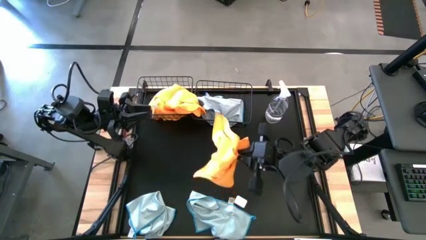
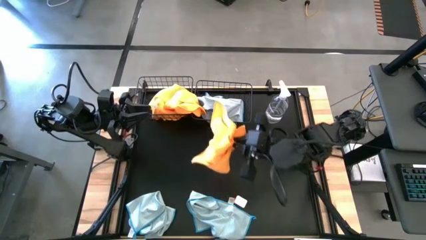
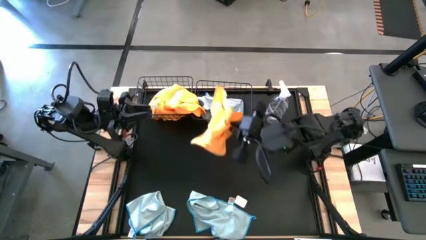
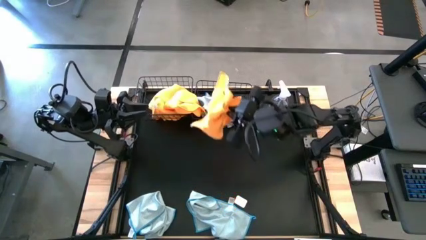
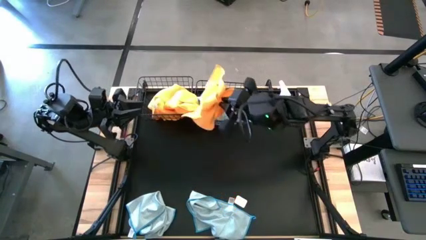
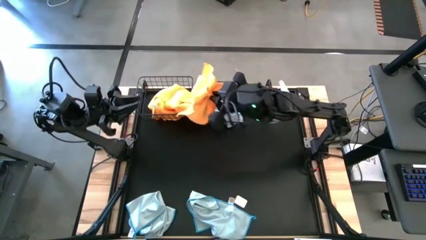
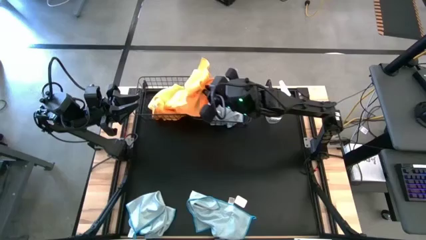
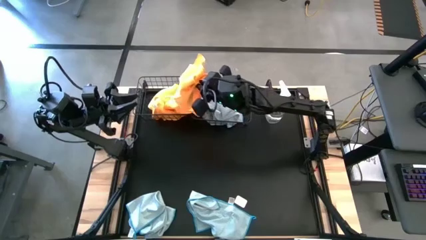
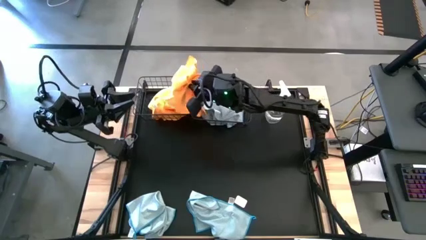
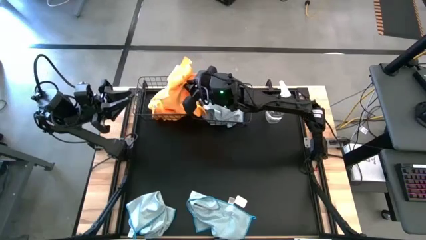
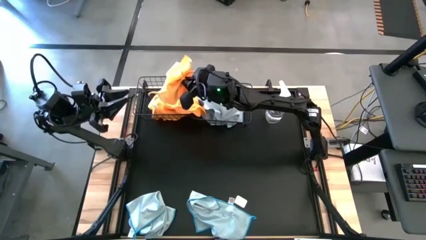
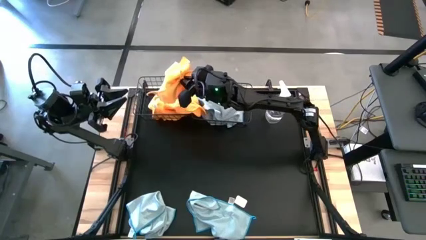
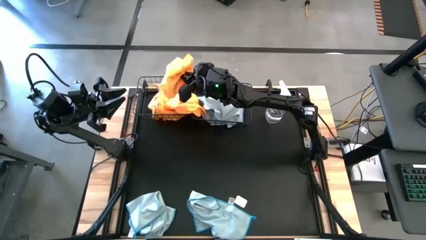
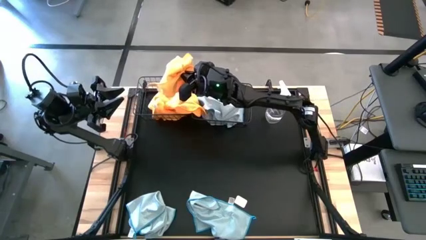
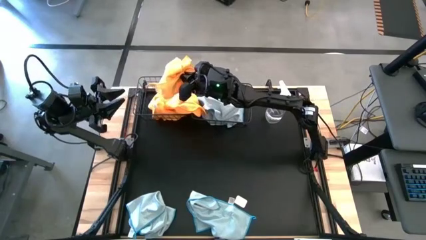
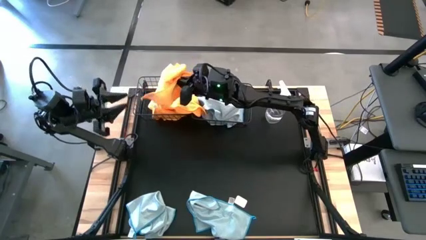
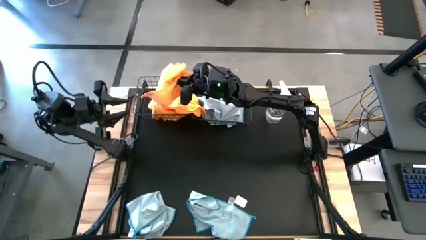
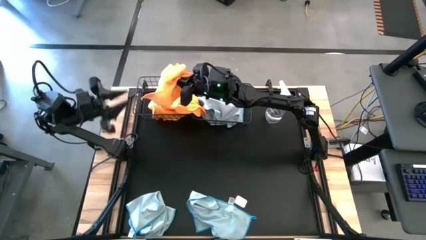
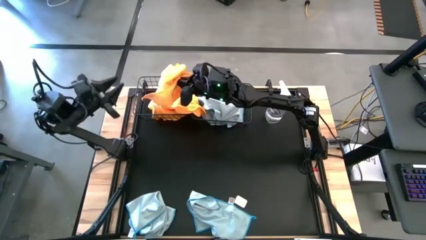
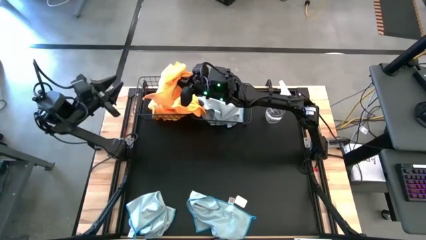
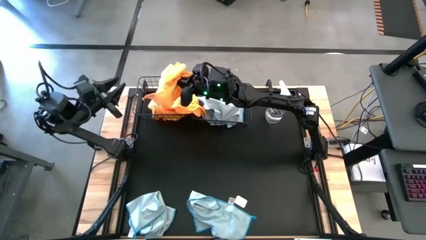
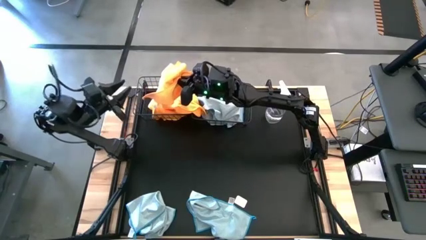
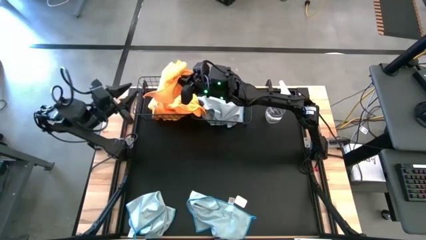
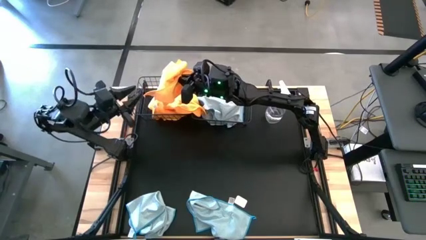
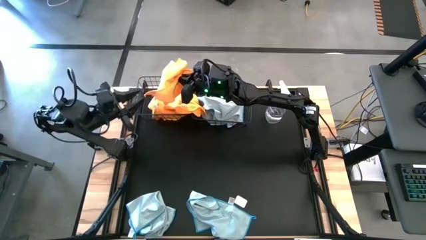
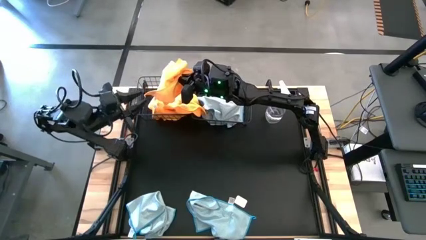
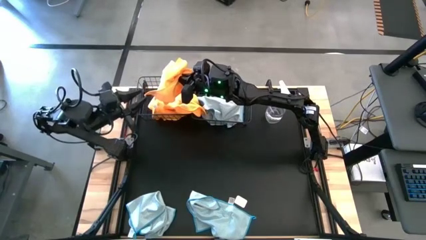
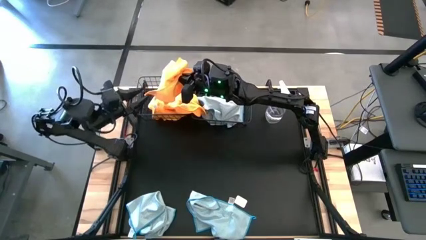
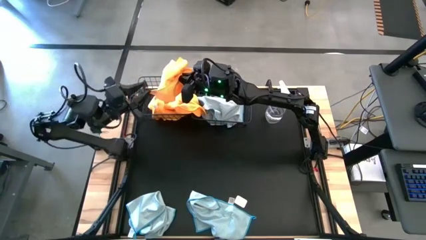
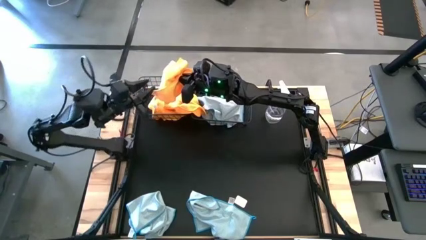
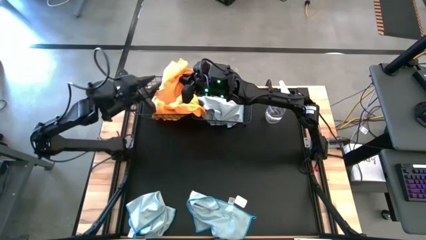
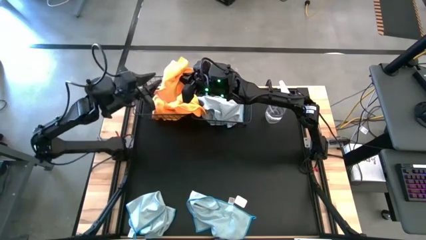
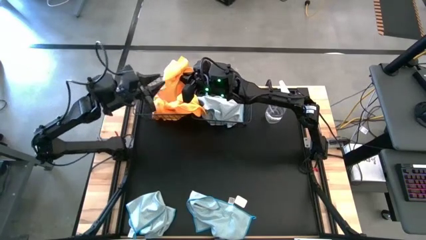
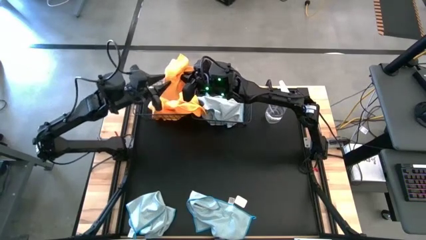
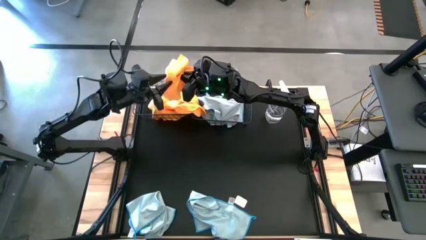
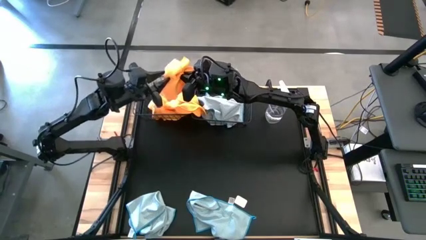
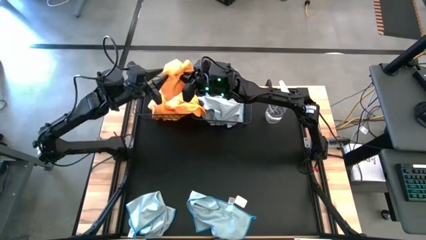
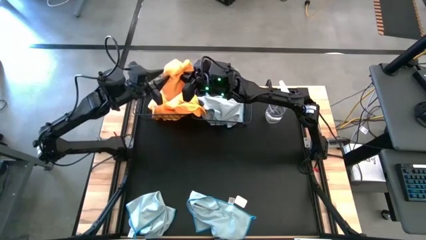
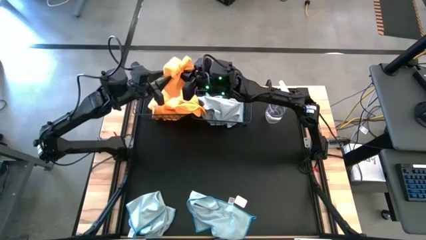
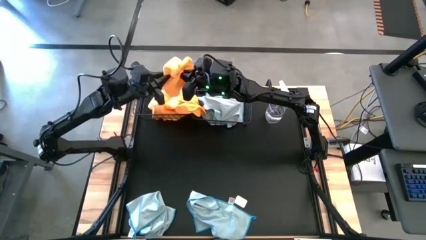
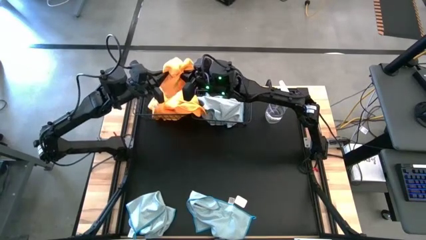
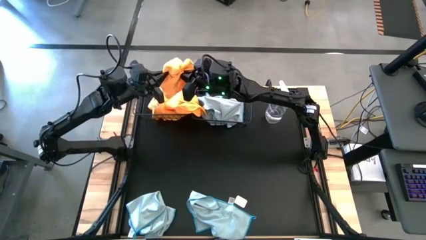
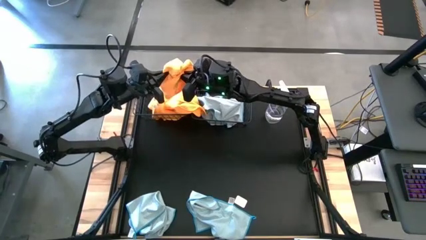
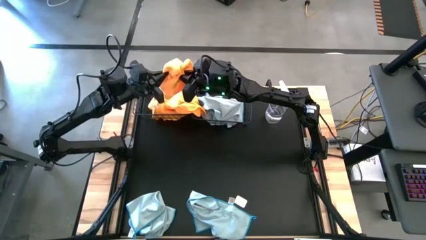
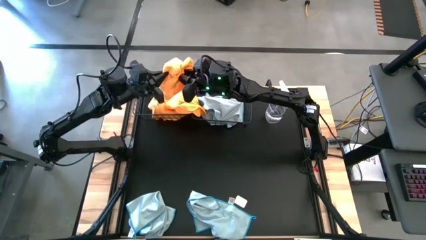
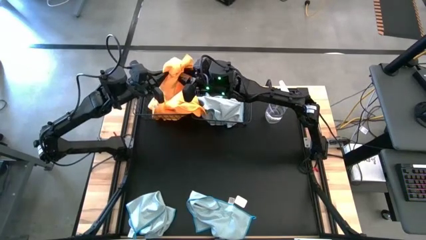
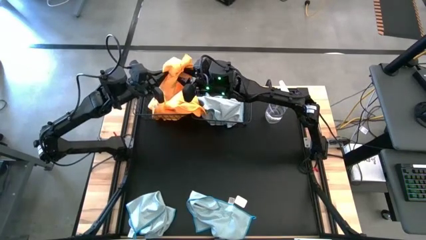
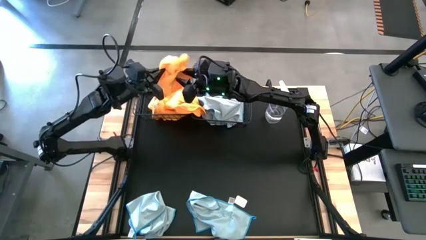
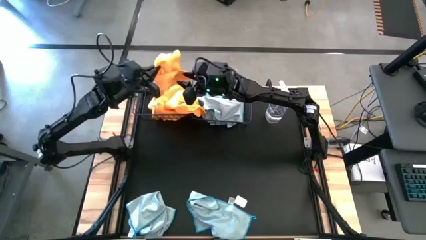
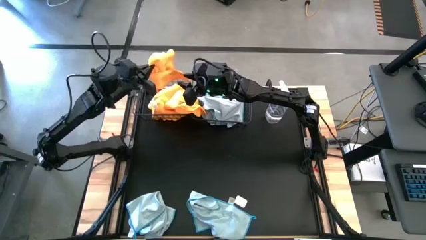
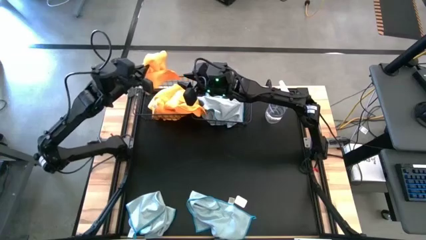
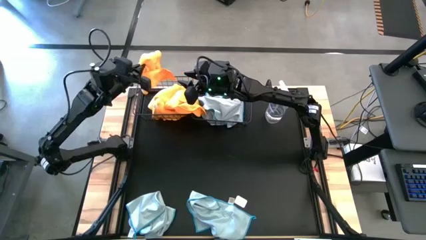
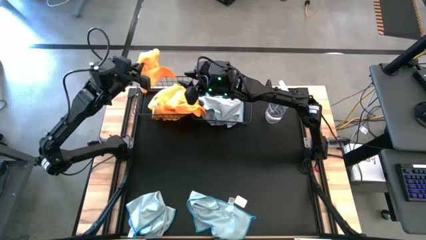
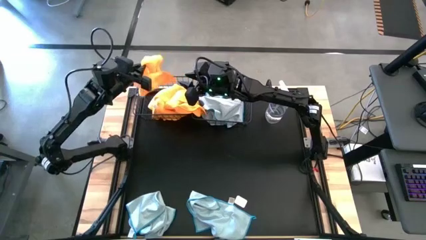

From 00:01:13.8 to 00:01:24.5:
Task: Sort microfiber towel by color & place in baskets
Put the yellow microfiber cloth into the left black wire basket

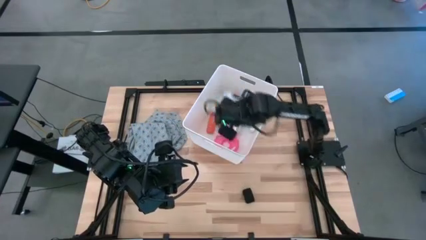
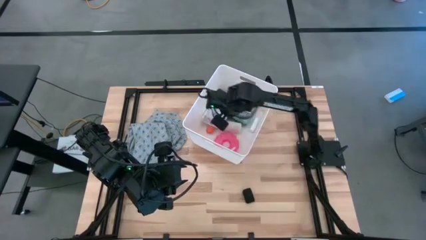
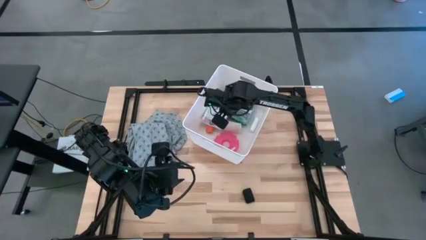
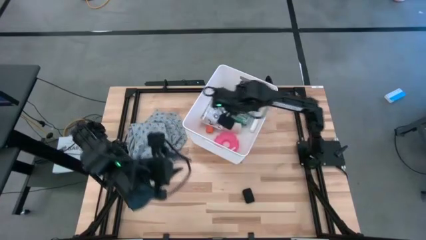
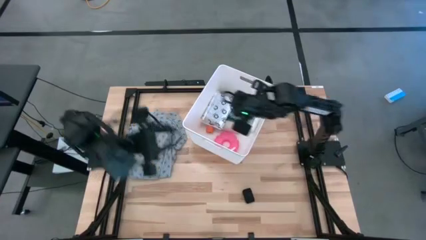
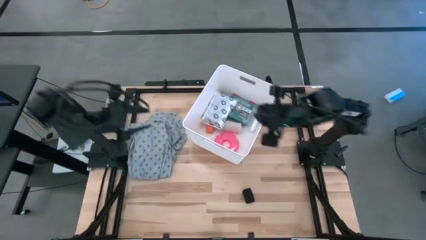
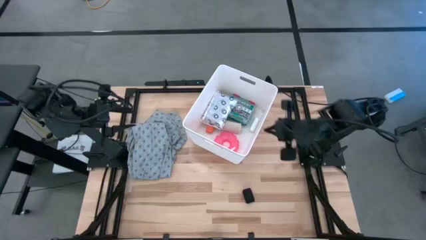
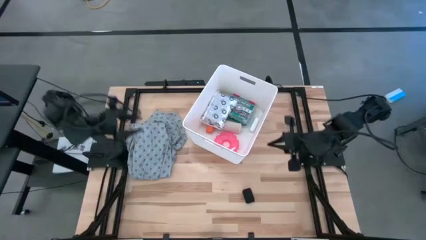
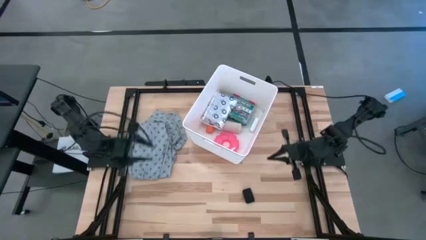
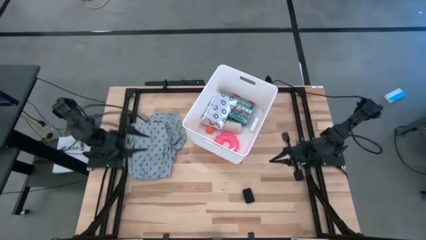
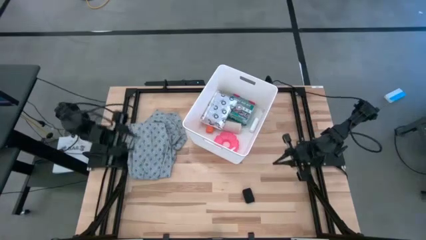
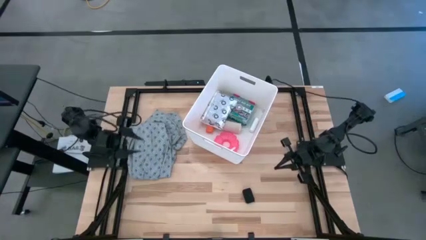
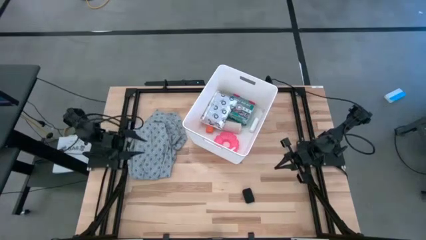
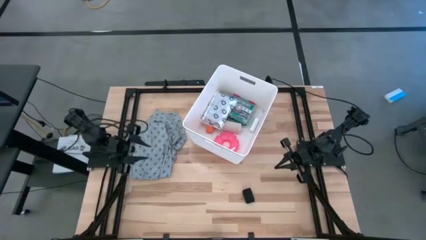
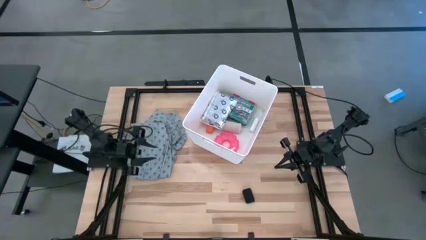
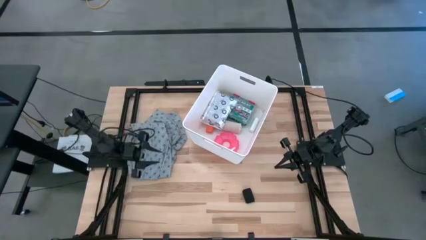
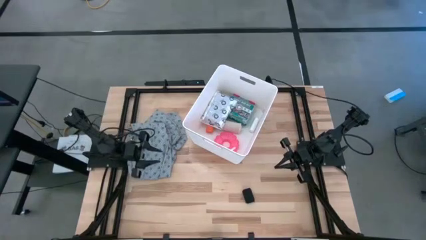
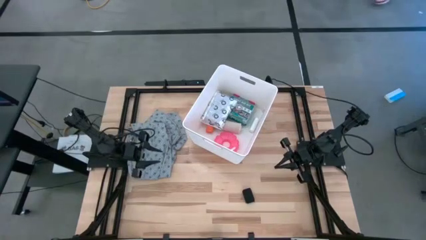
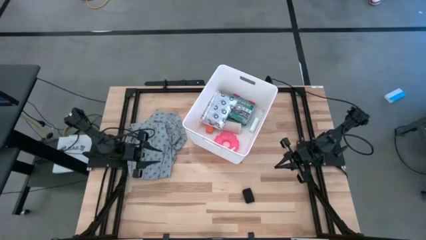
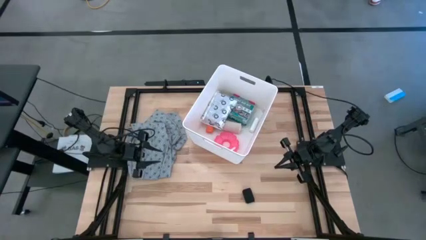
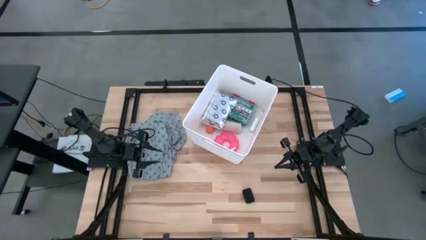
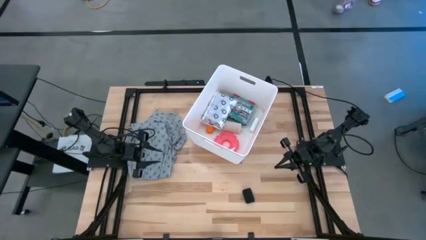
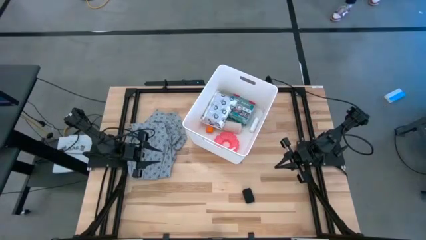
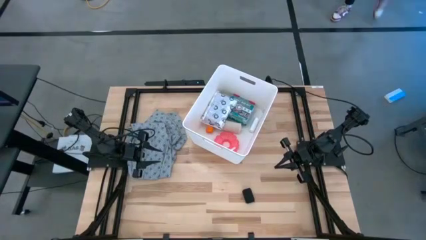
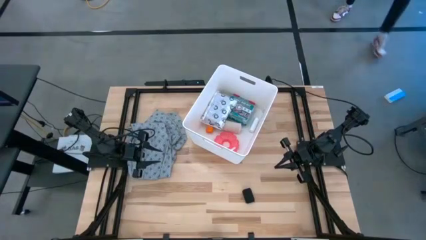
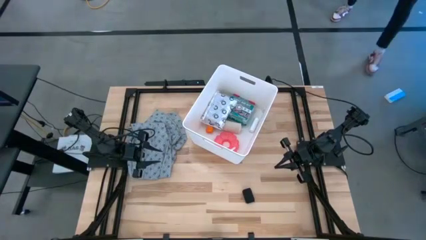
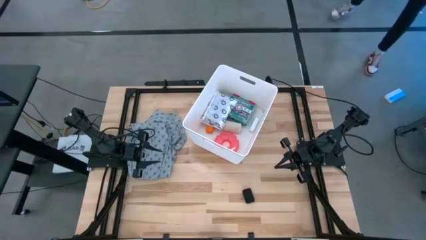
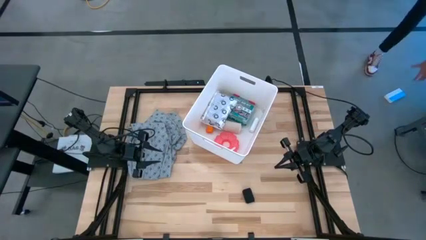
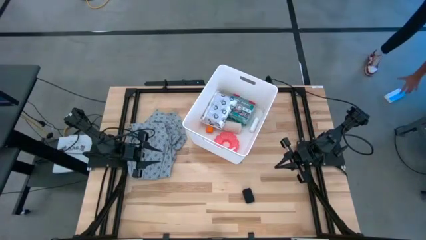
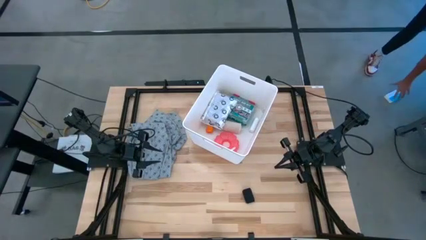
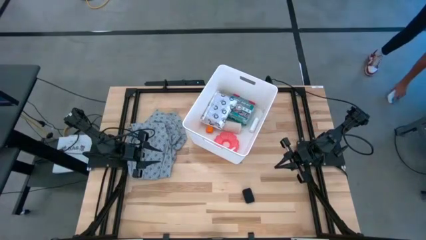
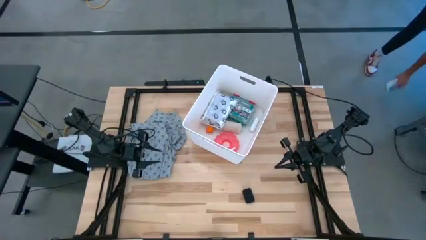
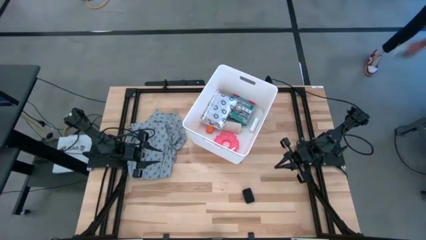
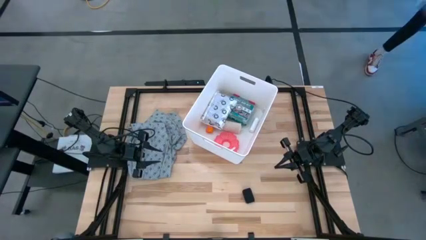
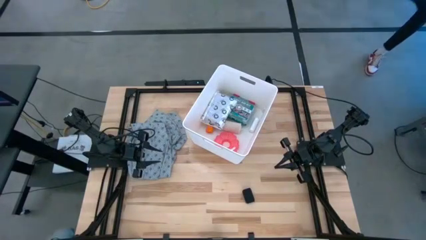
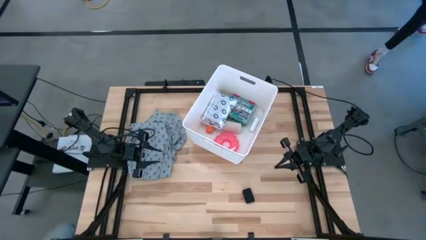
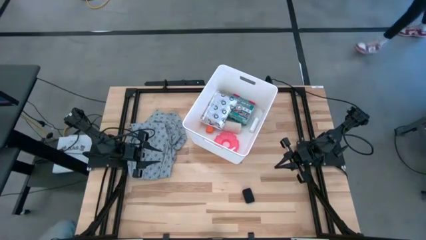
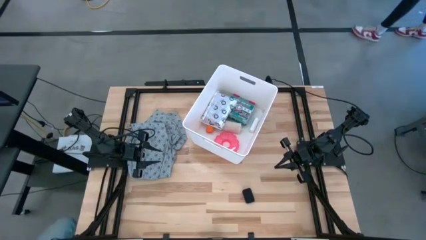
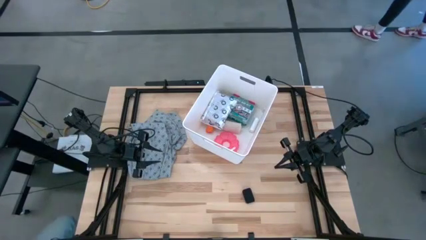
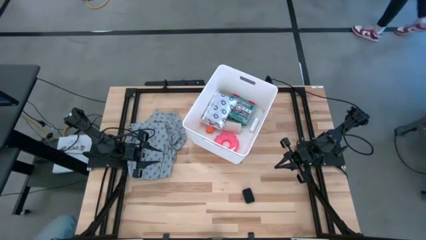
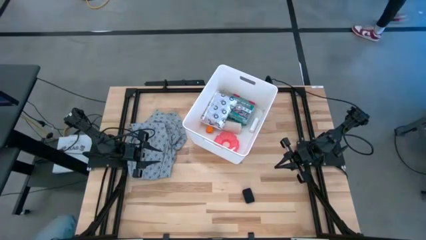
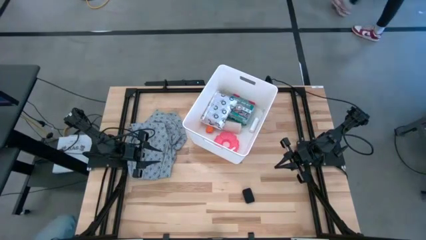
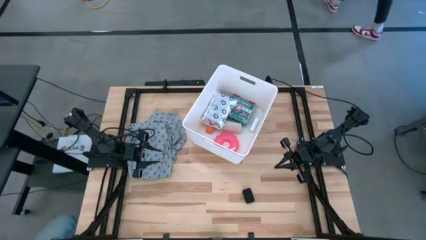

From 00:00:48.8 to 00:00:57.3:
Task: Pick & place medical supplies in basket/bin
Return to Home Position
